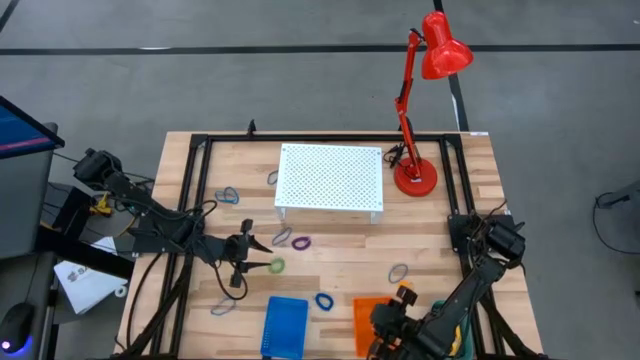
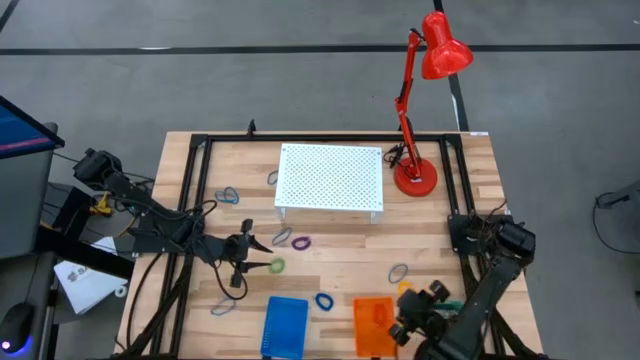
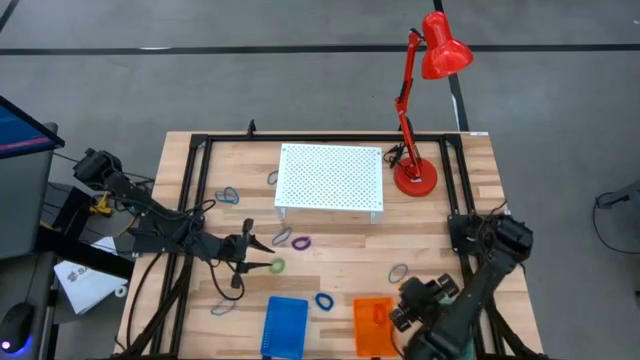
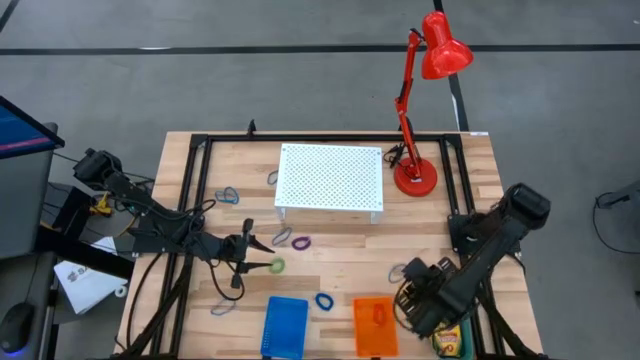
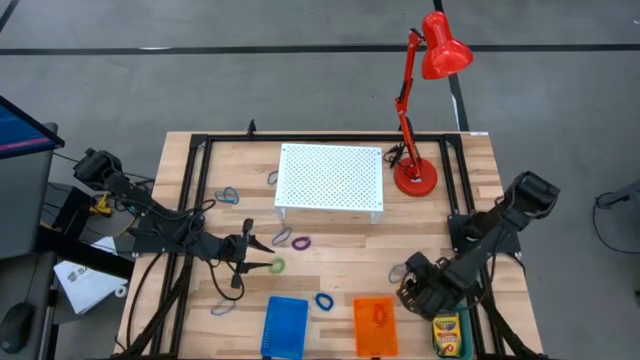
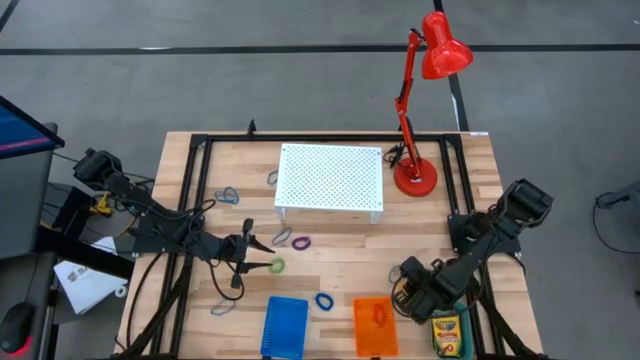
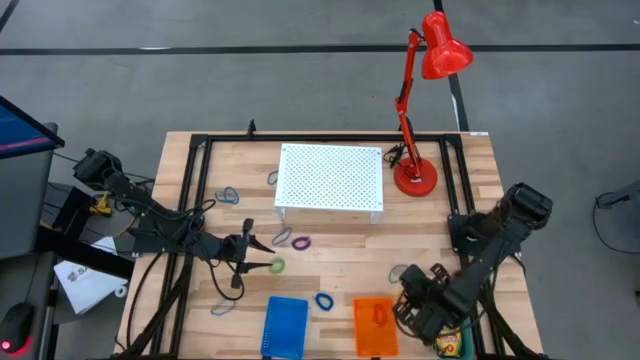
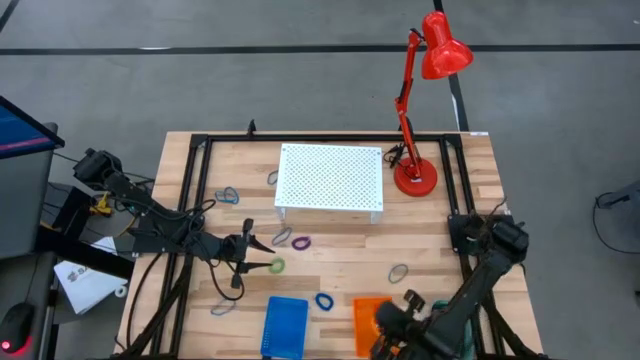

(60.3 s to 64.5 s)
Task: Pick & Place Office Desk Supplies
Put the yellow spring keychain into the orange bin

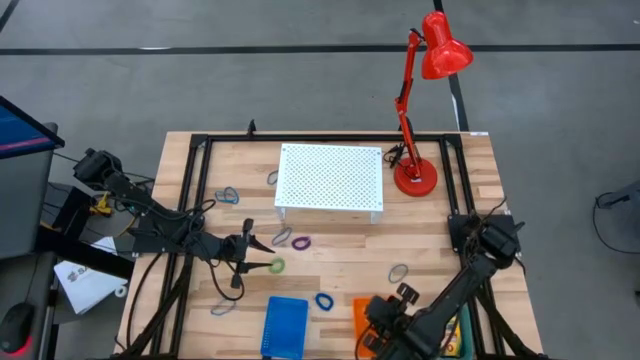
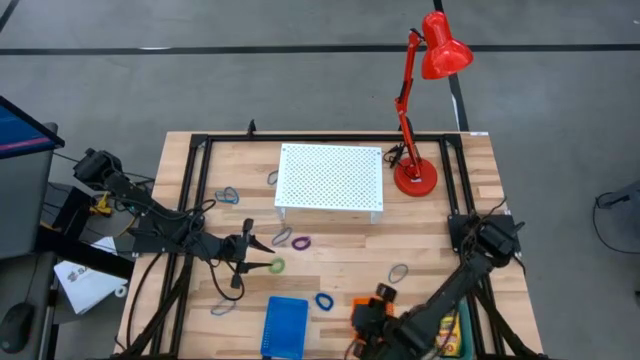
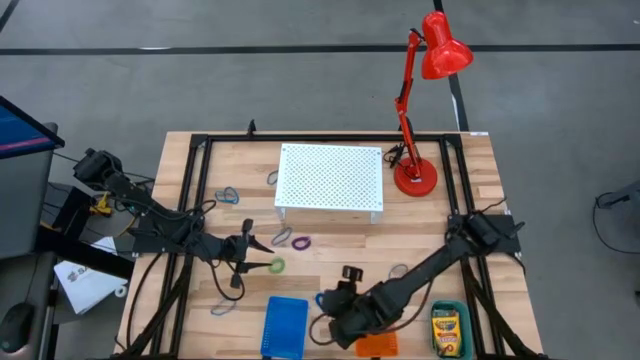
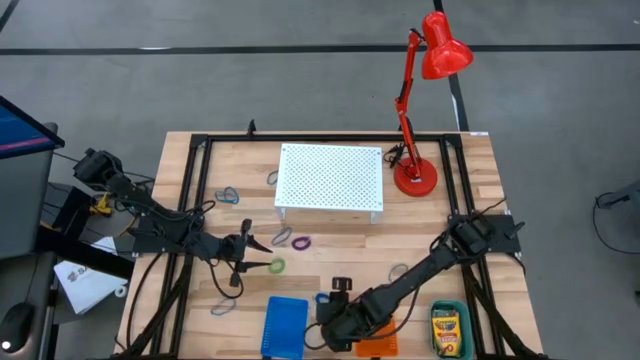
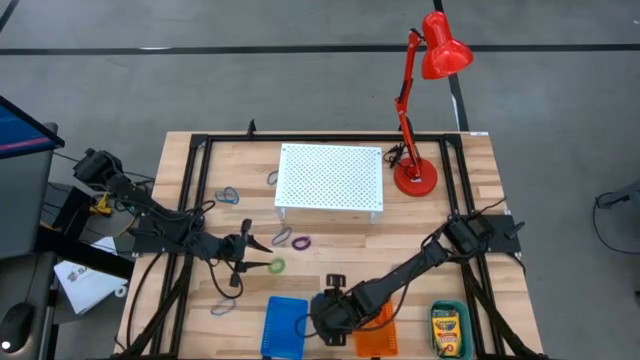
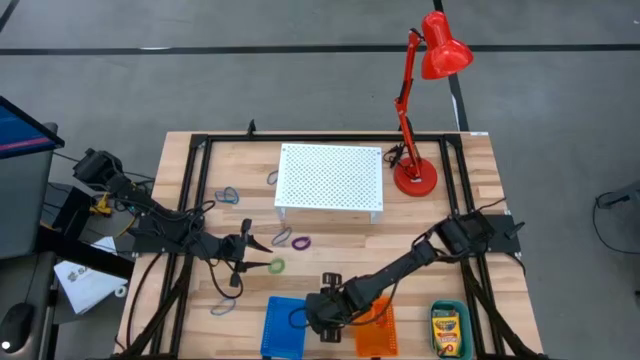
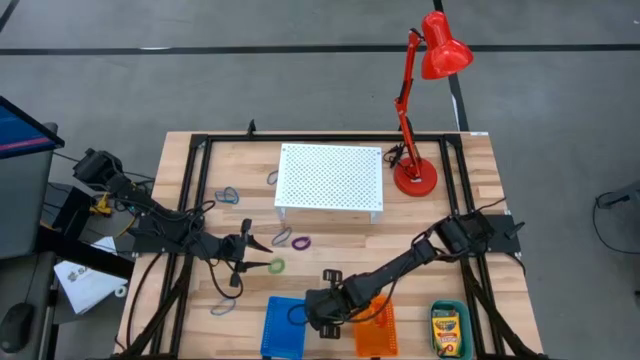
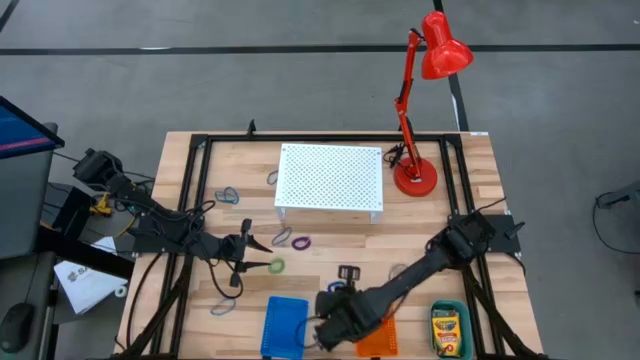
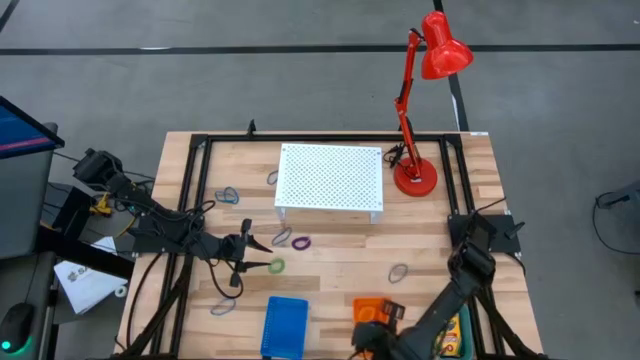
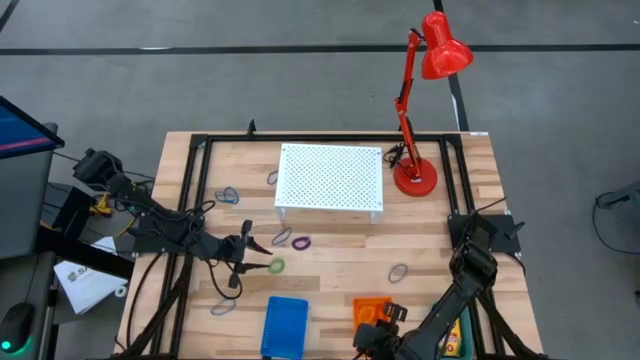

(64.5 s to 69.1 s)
Put the blue spring keychain into the orange bin

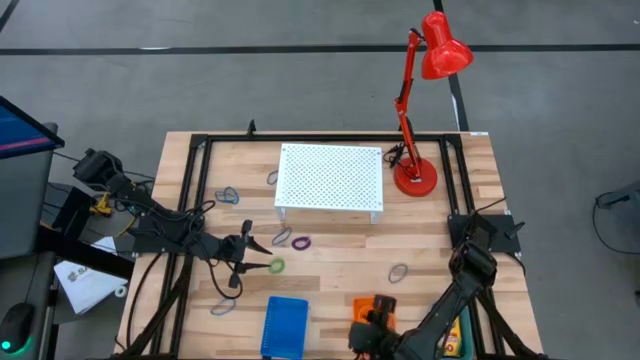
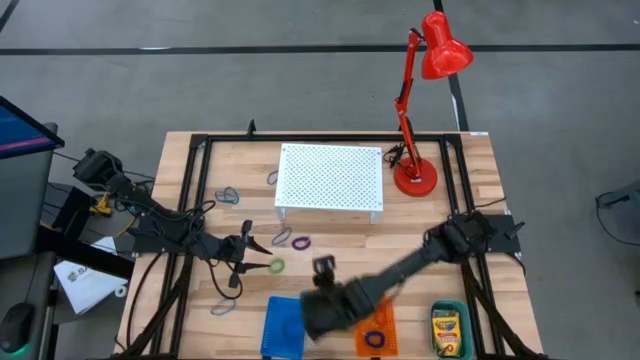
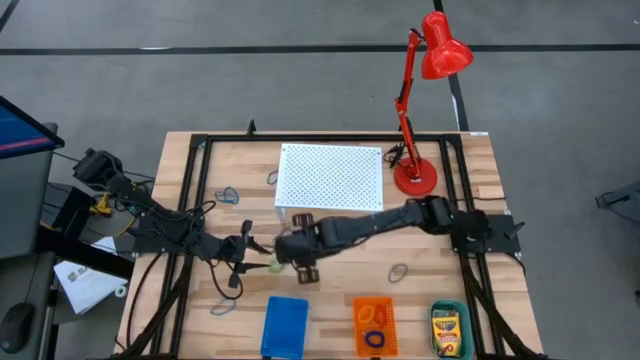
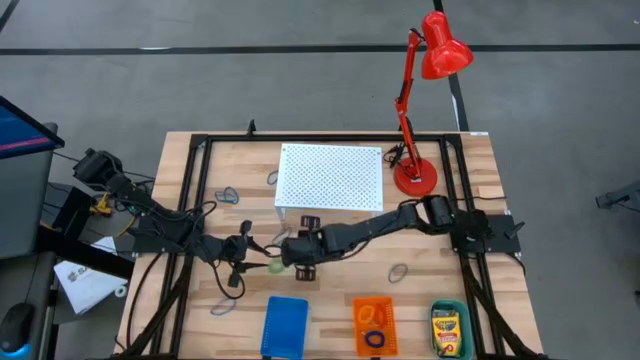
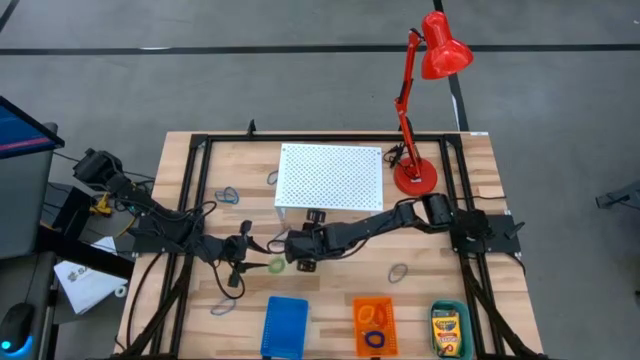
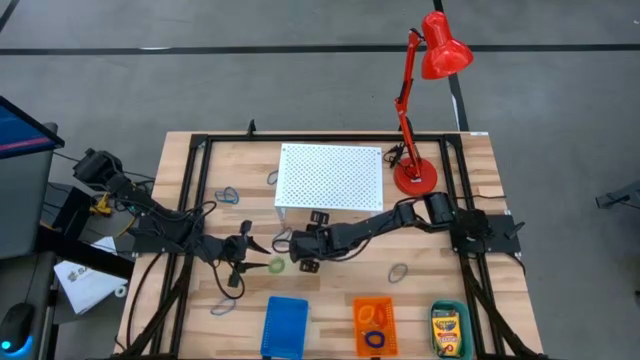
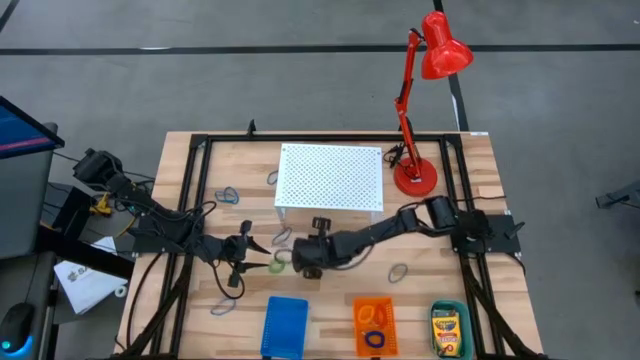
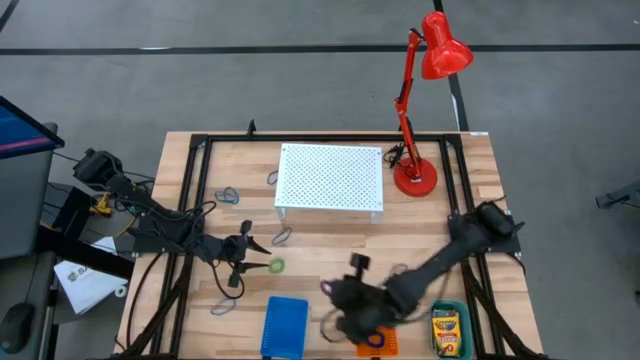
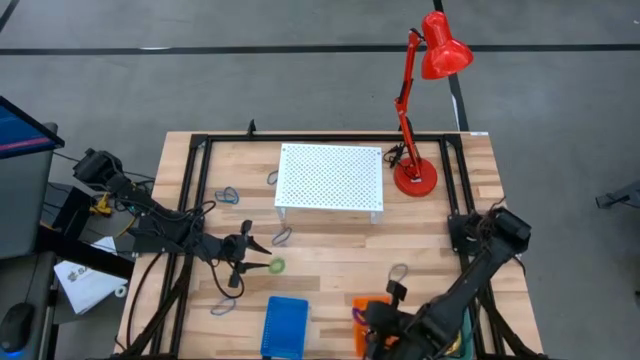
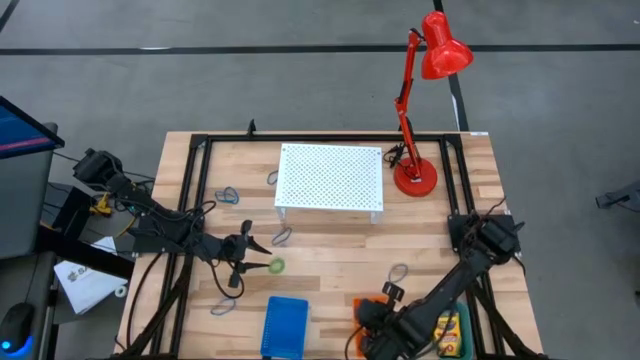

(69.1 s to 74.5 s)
Put the violet spring keychain into the orange bin

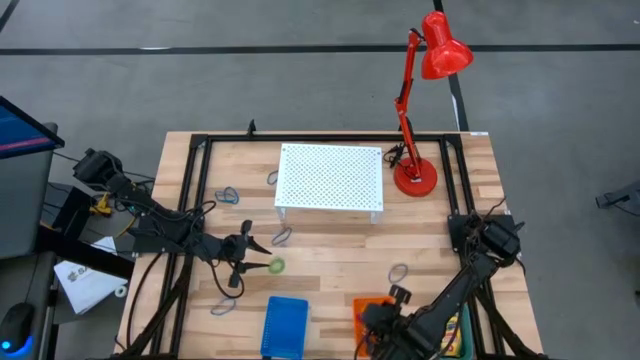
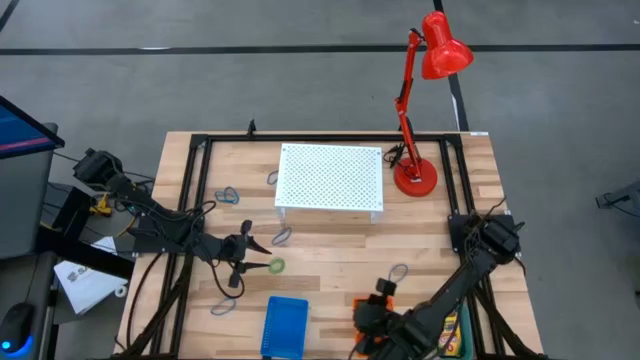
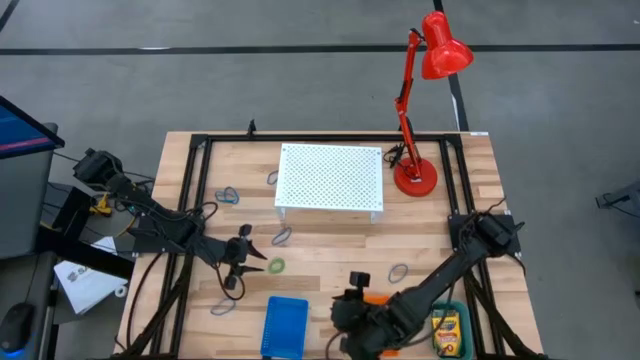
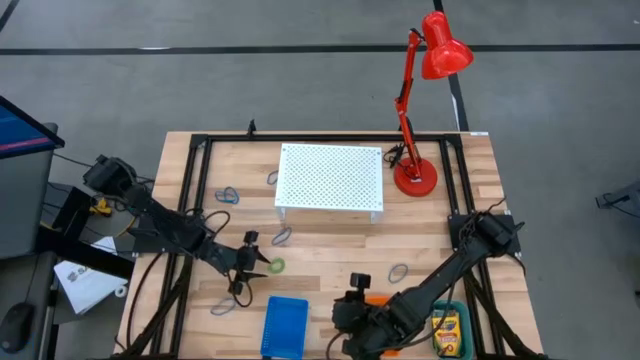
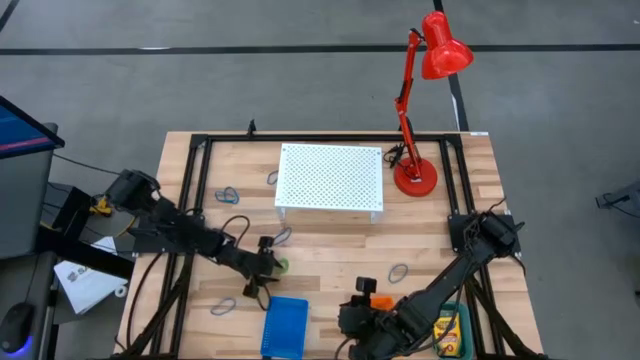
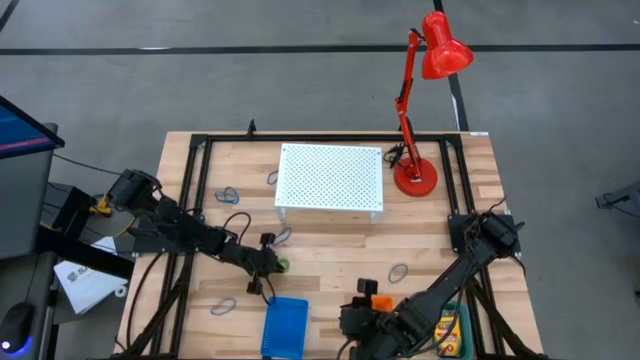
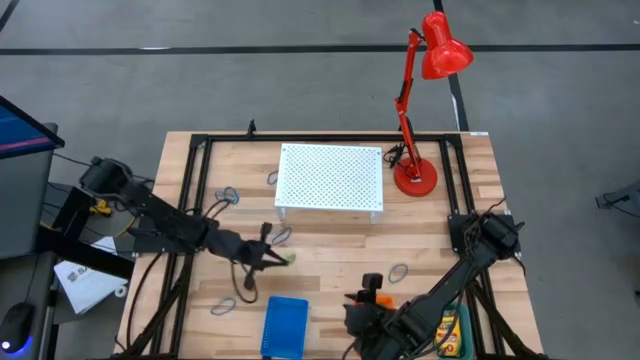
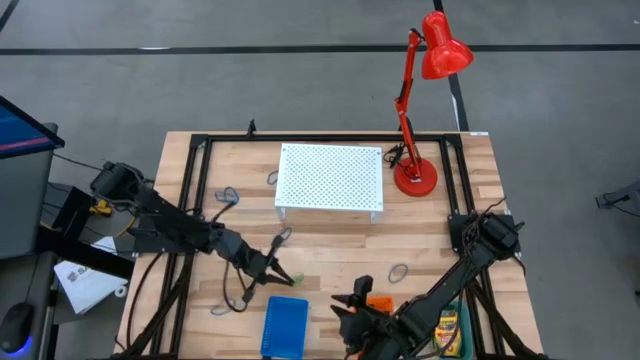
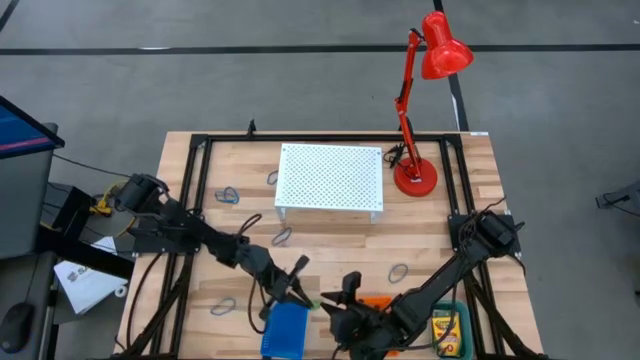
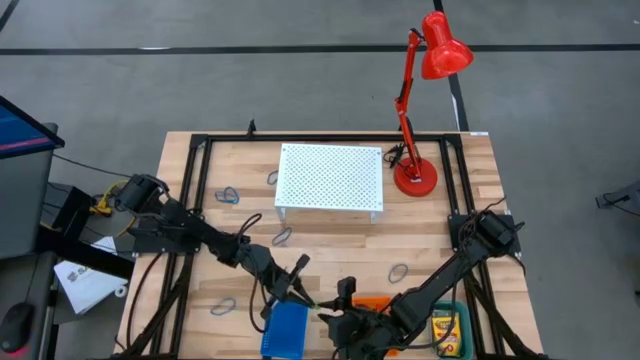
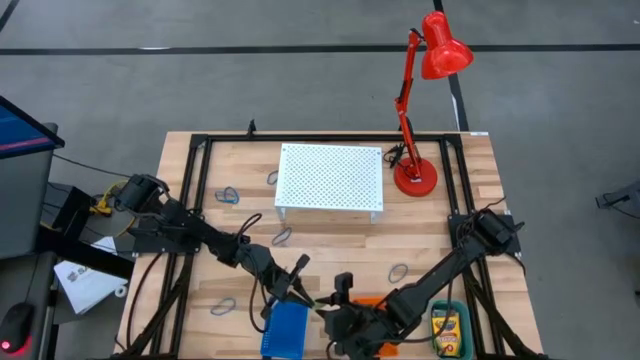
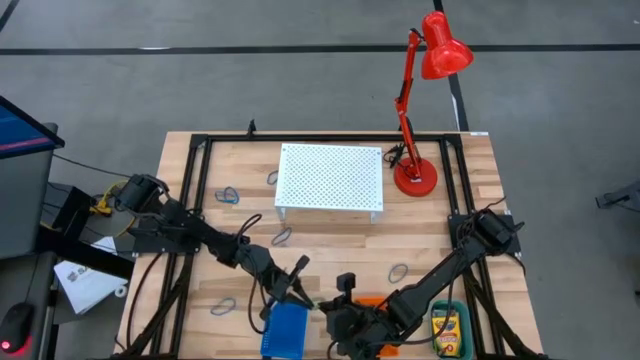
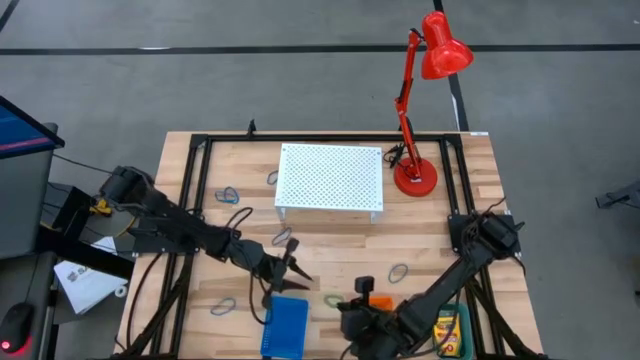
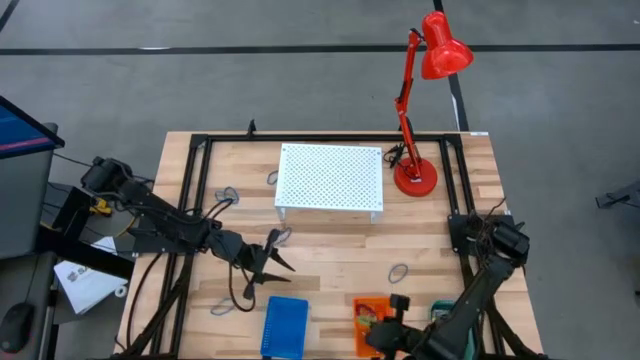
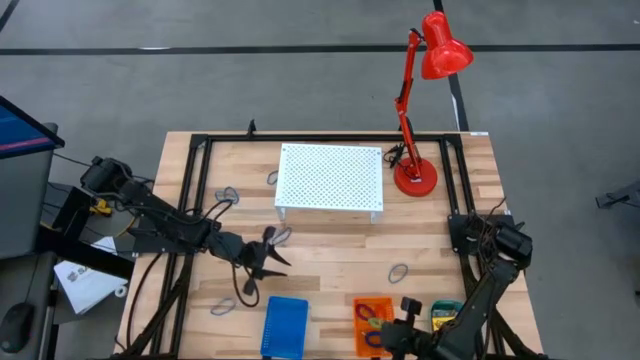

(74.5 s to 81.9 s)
Put the green spring keychain into the orange bin
